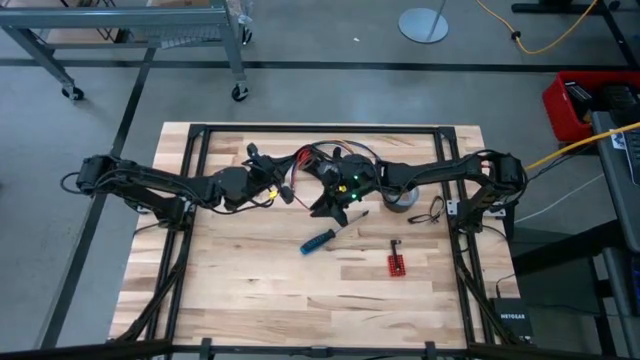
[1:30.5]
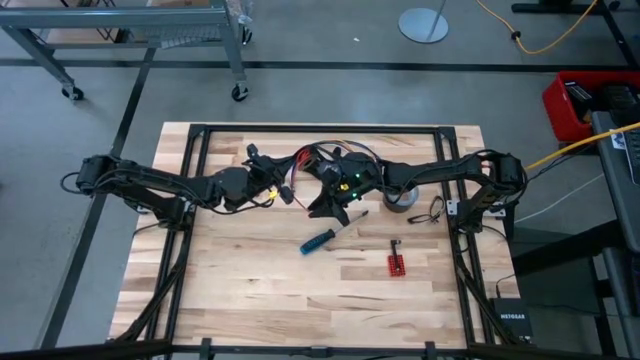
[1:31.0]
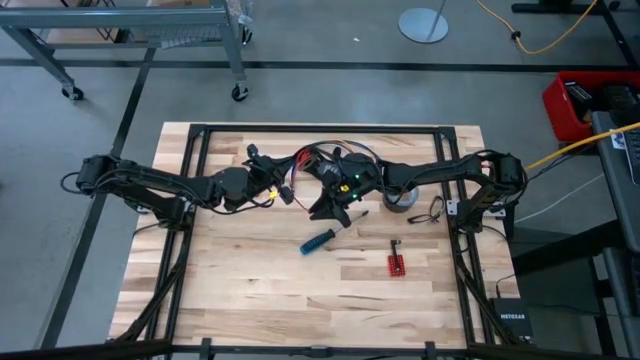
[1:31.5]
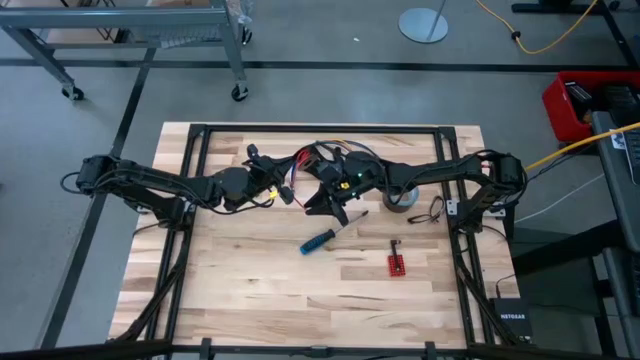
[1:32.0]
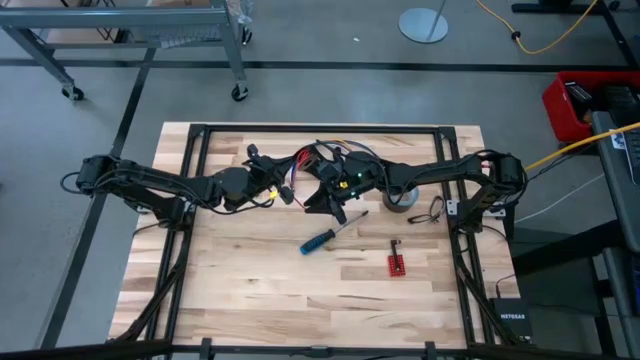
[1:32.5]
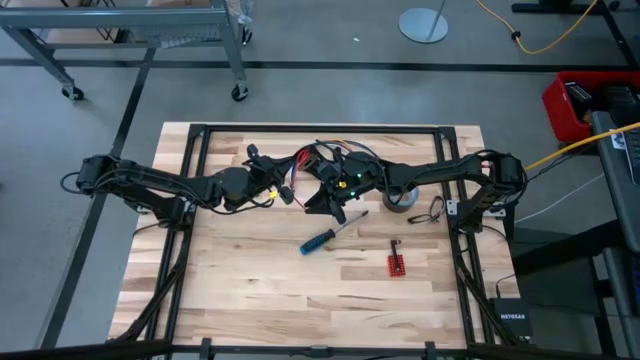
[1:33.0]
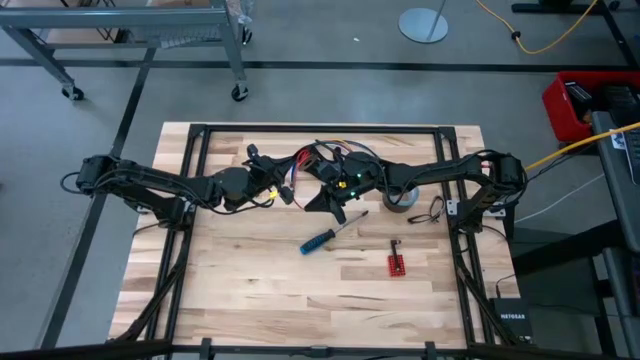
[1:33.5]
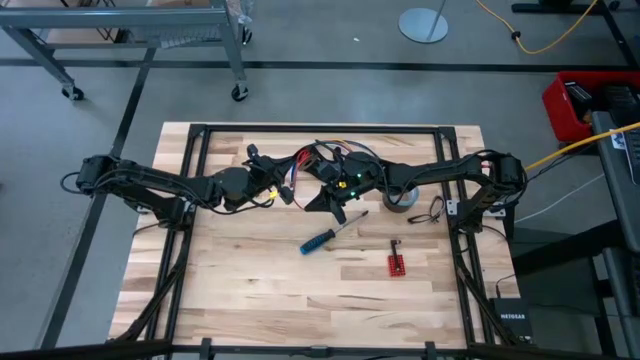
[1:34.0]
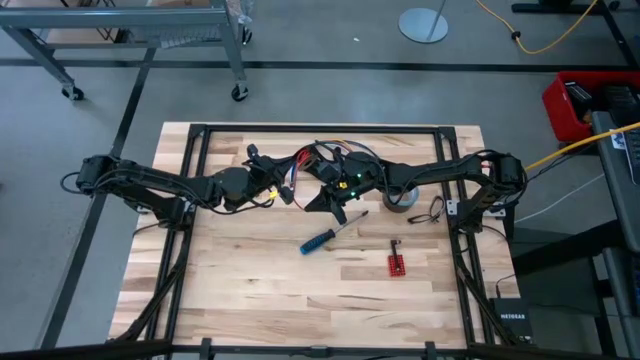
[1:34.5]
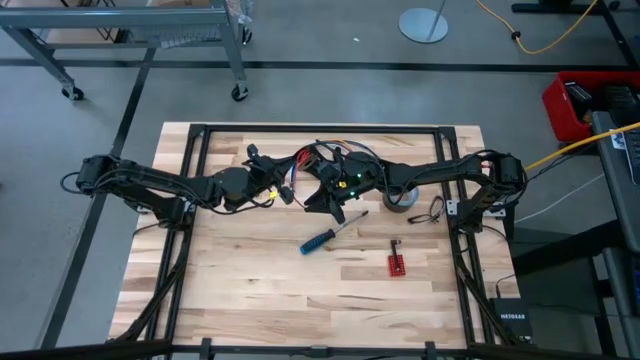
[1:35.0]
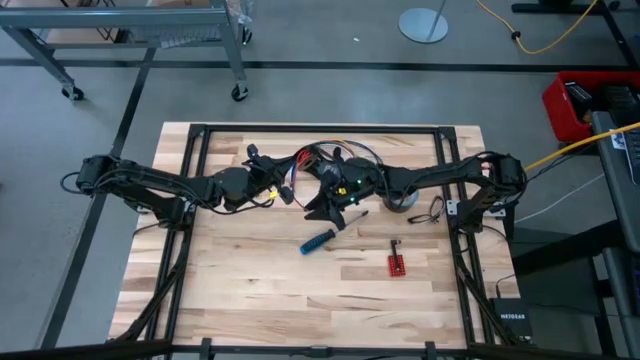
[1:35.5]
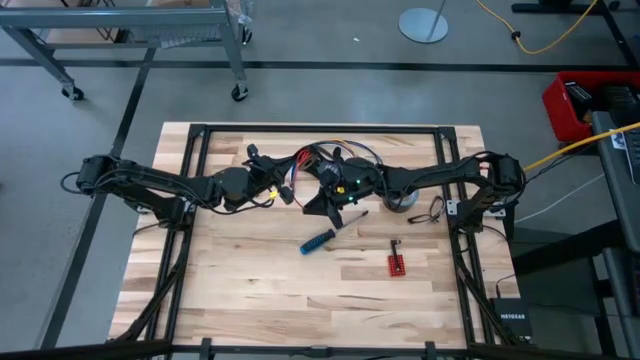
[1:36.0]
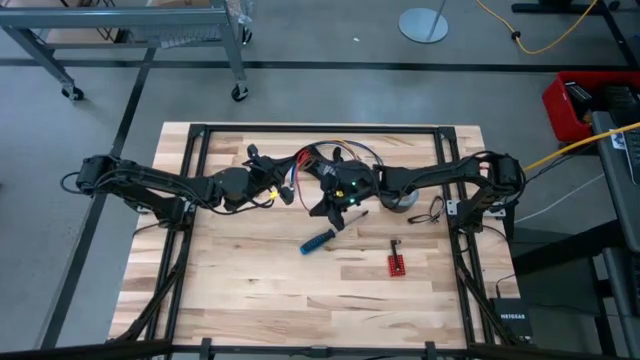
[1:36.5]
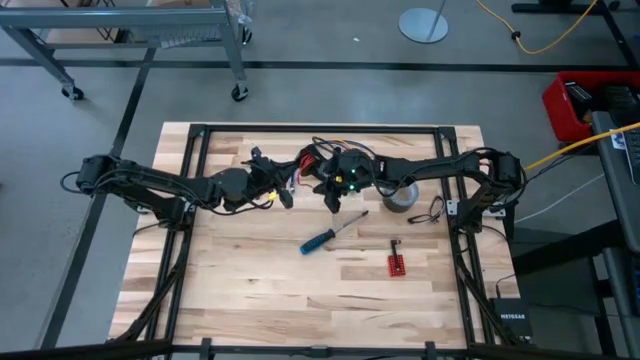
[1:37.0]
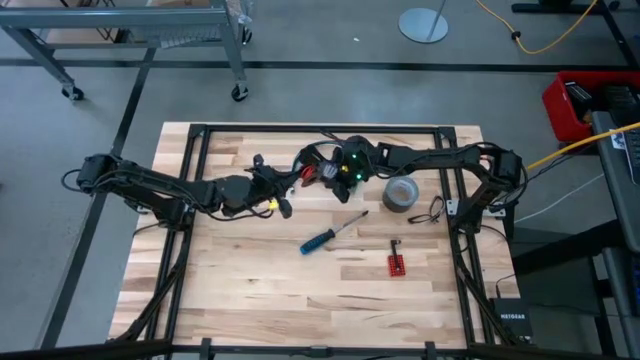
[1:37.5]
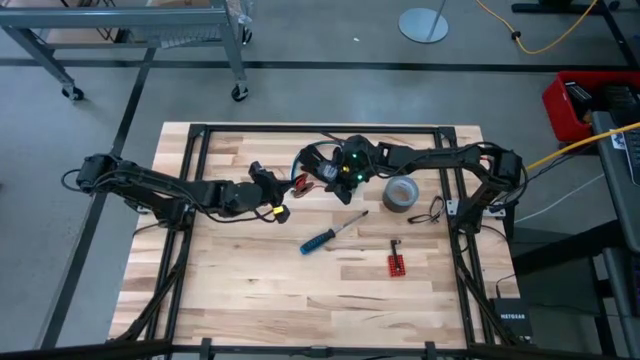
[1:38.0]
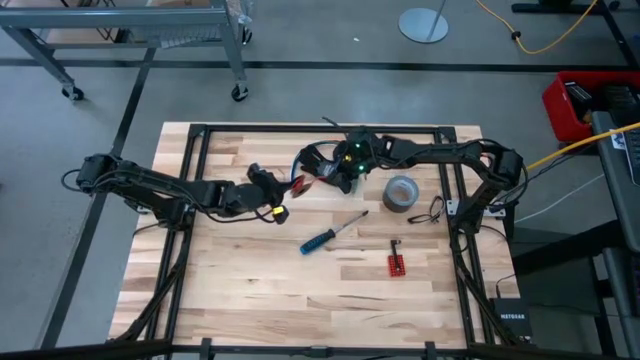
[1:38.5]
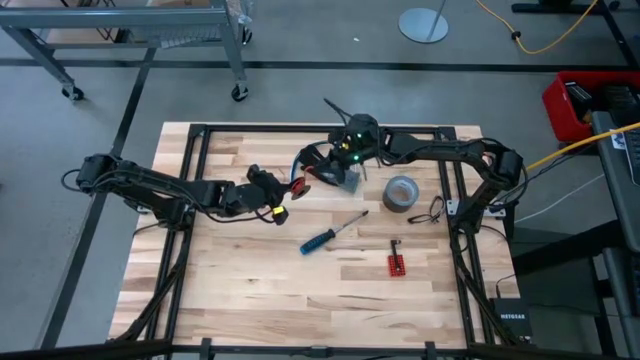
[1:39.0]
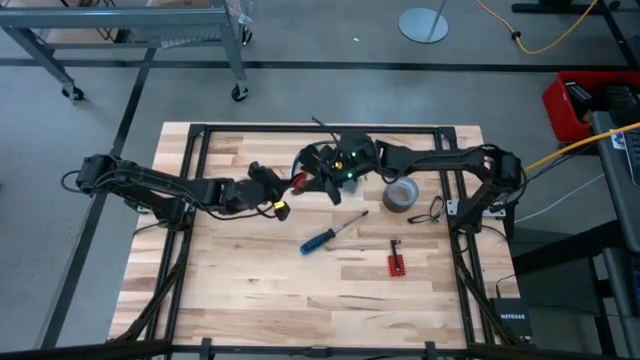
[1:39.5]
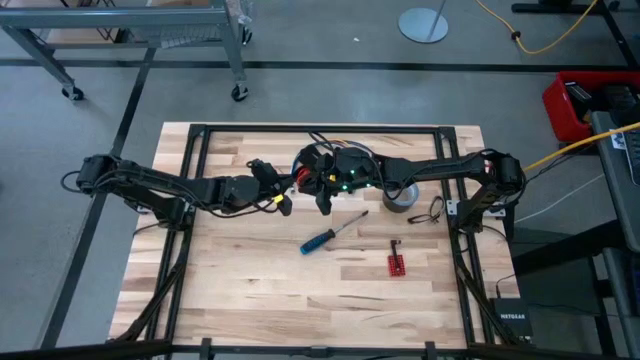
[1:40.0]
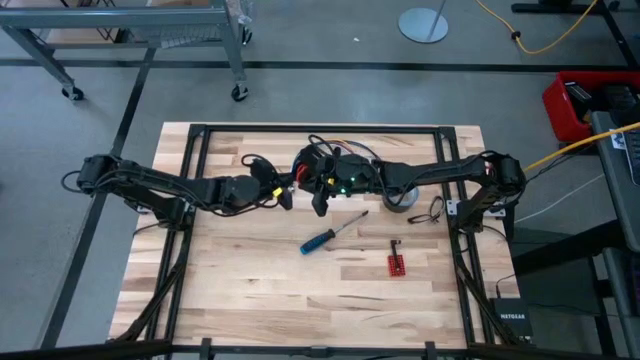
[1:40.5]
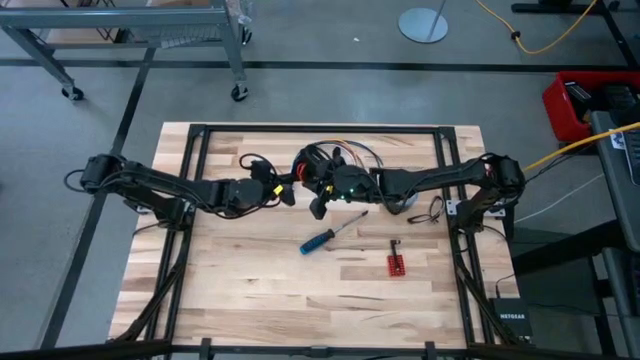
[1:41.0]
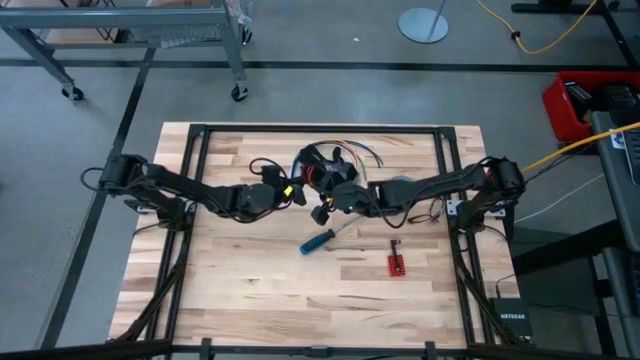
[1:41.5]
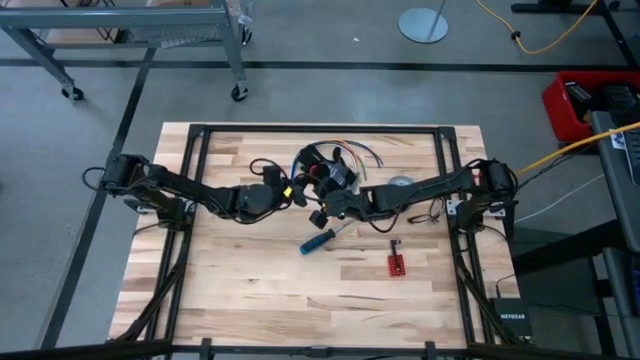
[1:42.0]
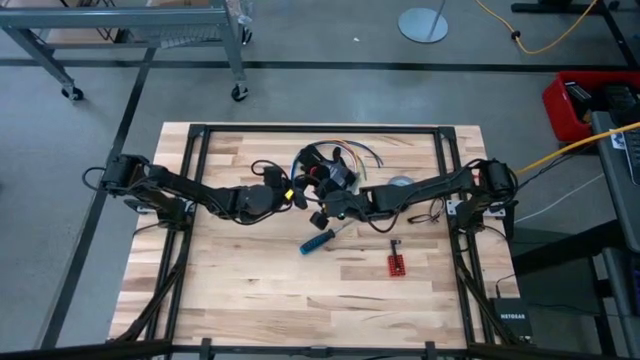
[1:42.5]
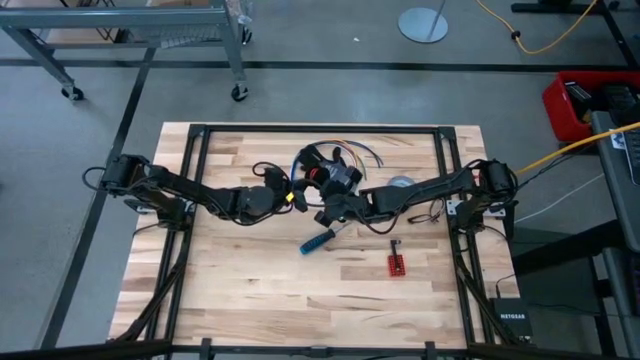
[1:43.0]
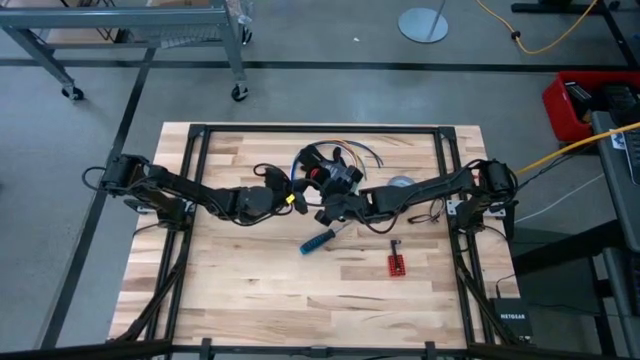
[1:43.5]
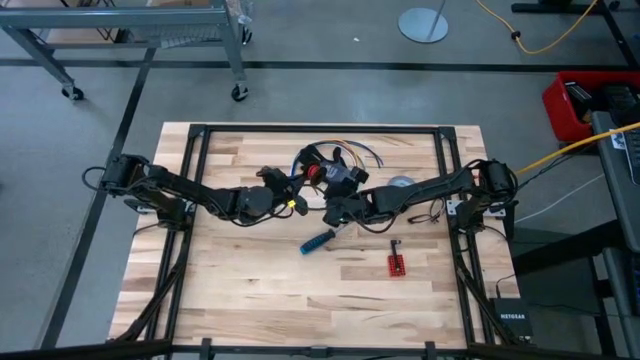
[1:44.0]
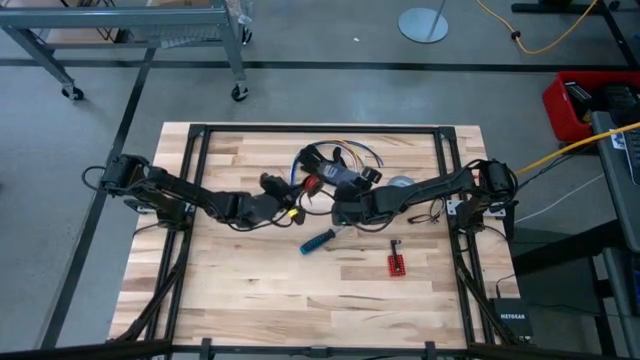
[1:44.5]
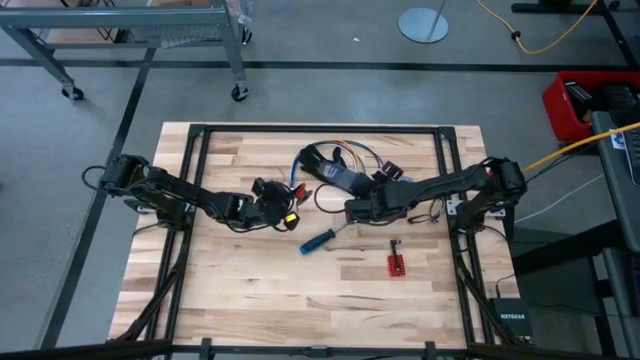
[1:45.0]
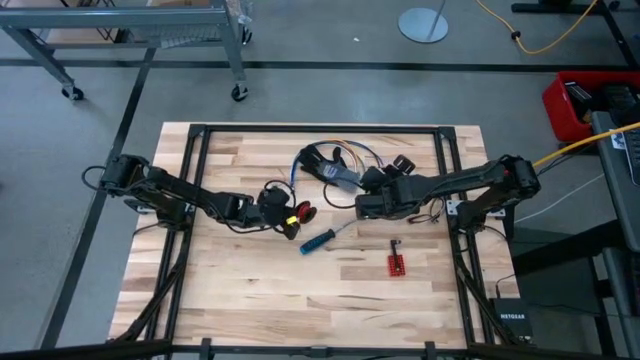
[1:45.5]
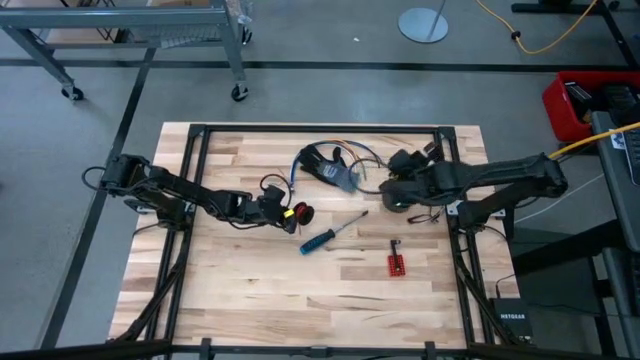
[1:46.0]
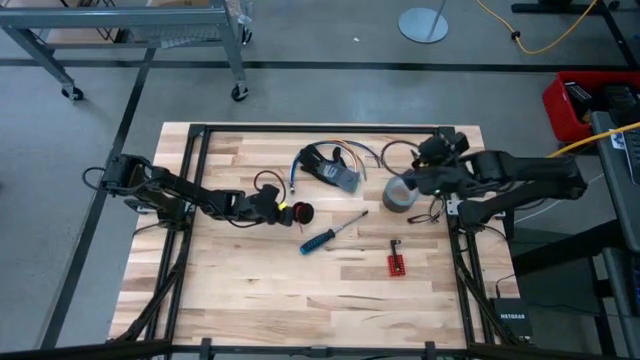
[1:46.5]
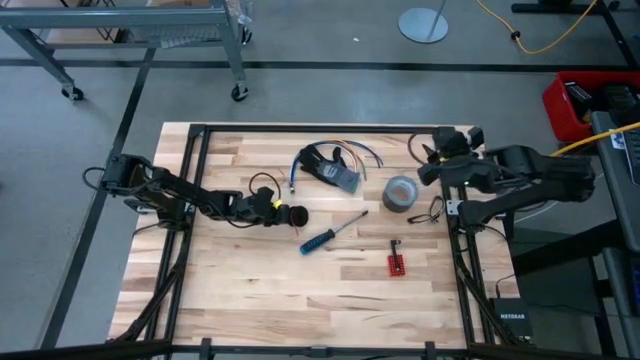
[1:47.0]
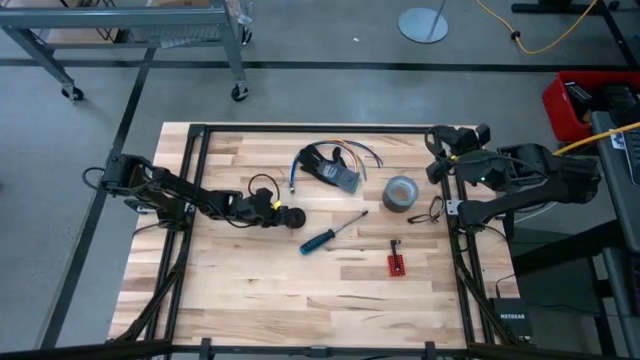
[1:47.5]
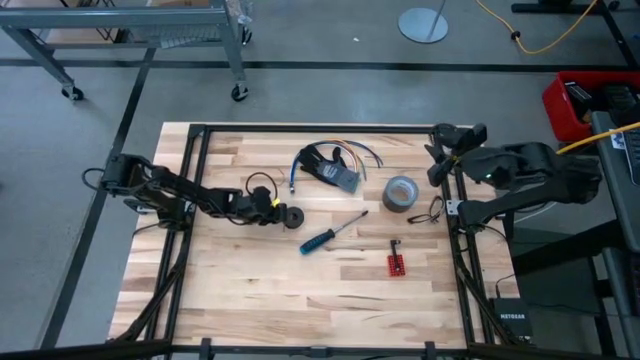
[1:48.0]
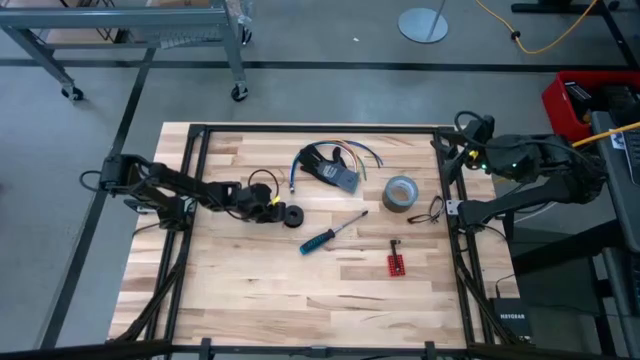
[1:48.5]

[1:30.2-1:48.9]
Task: Coil cords
Coil the red wire onto the spool

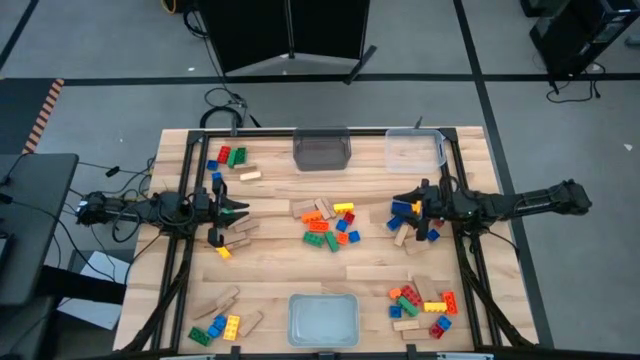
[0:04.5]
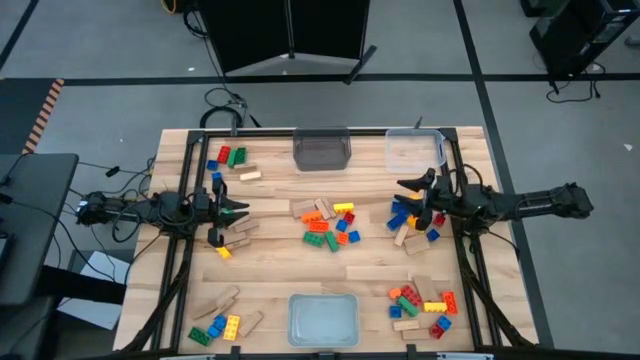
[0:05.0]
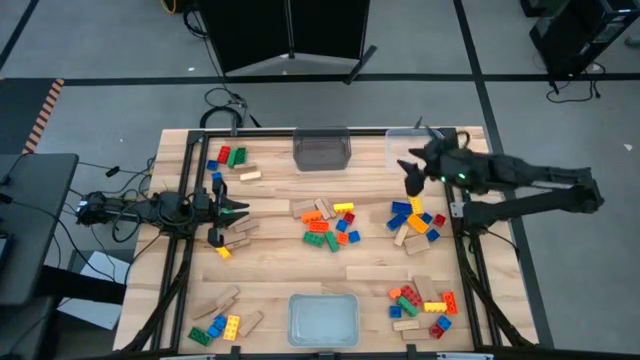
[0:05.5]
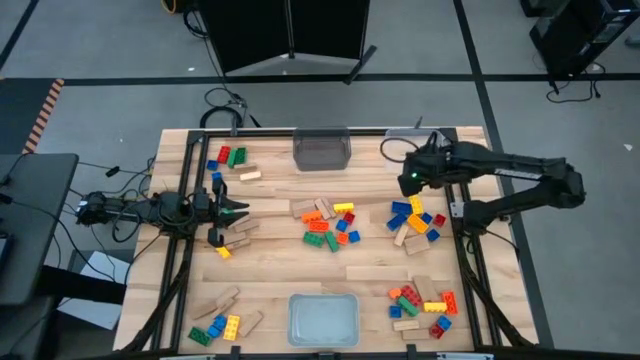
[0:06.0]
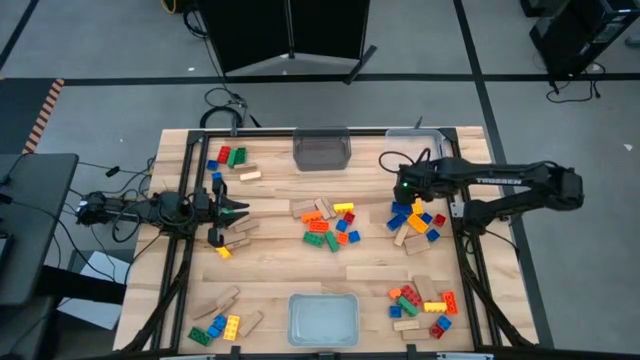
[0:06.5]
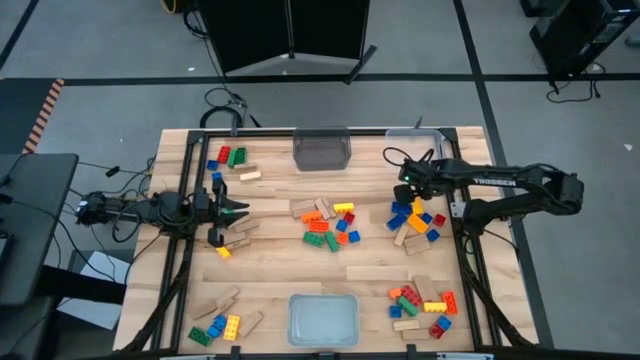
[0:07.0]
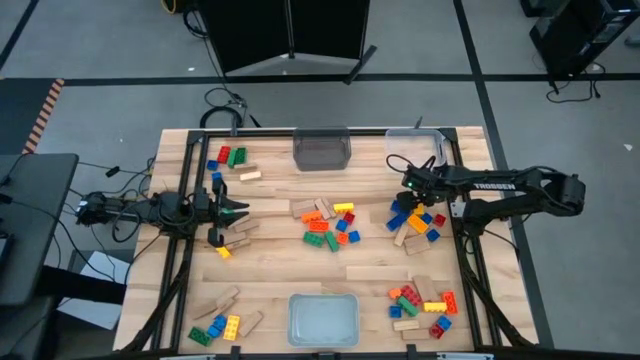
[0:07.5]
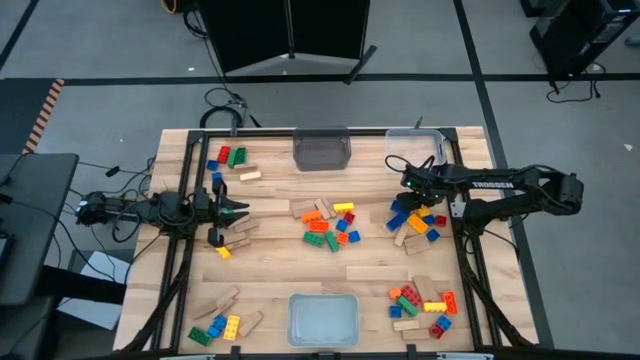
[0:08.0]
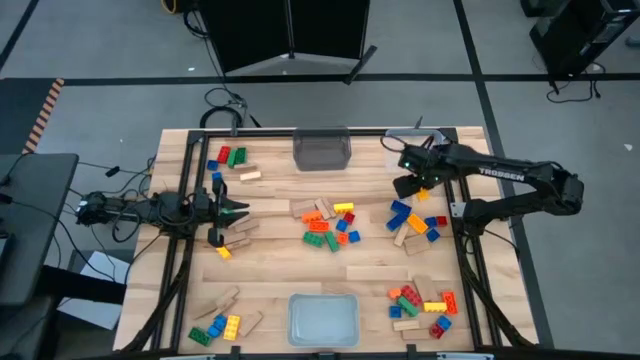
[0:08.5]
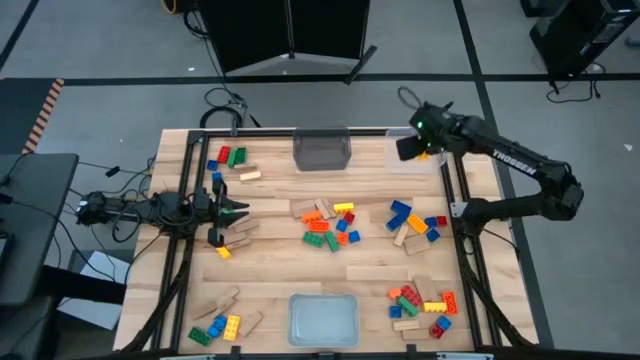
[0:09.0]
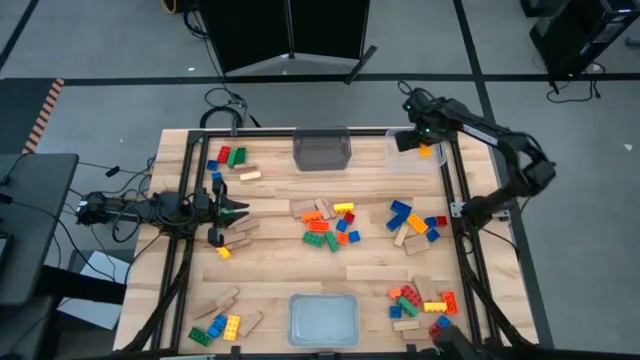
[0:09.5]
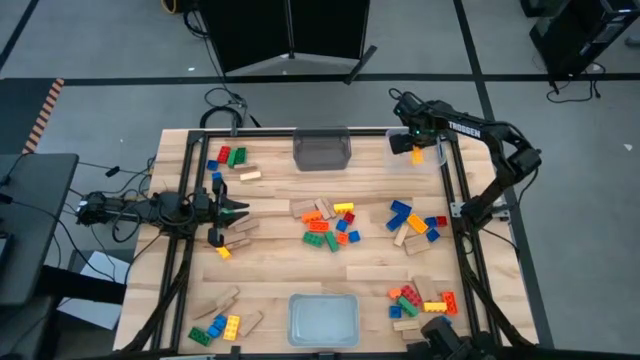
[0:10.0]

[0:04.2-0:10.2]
Task: Sort blocks by size
Put the large yellow game piece into the transparent bin
